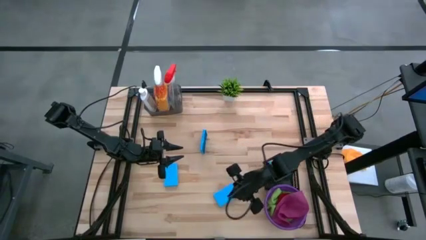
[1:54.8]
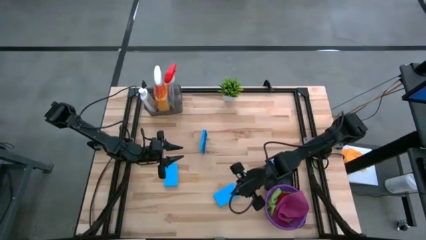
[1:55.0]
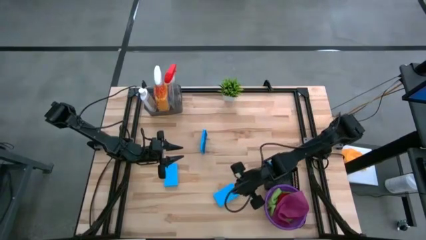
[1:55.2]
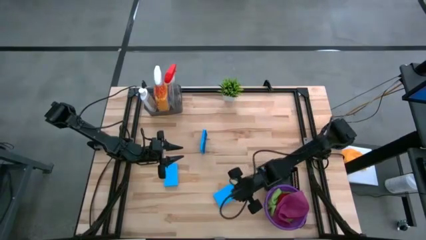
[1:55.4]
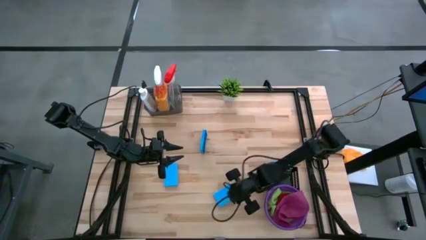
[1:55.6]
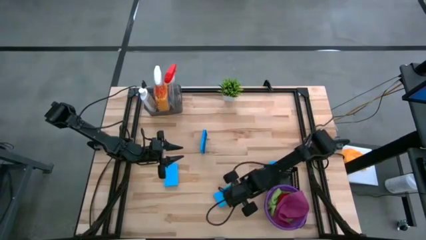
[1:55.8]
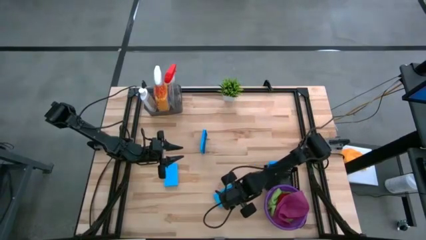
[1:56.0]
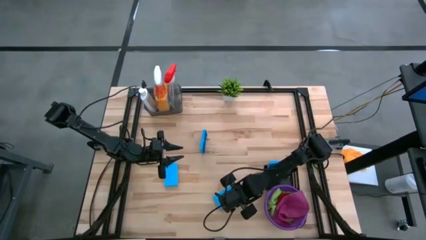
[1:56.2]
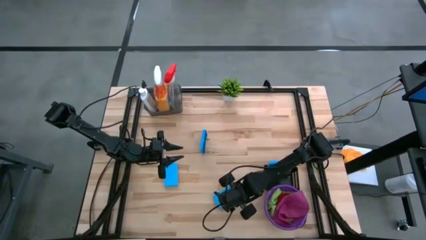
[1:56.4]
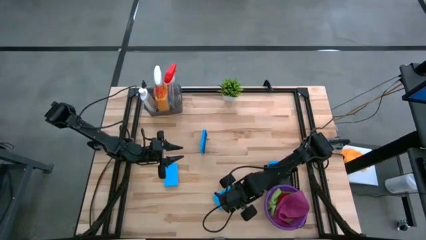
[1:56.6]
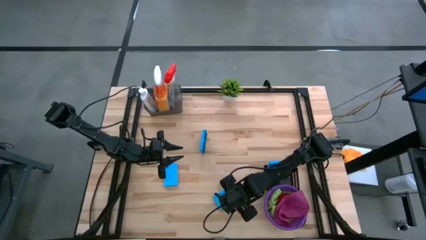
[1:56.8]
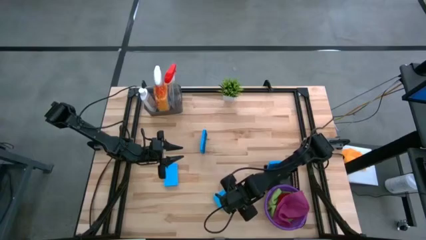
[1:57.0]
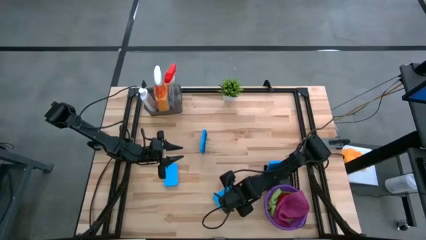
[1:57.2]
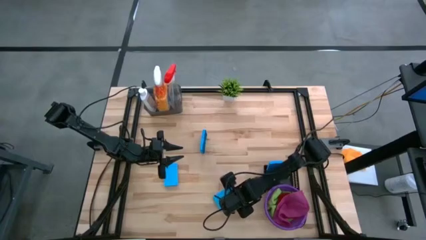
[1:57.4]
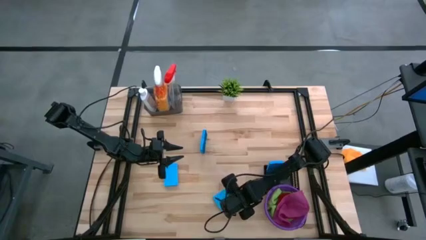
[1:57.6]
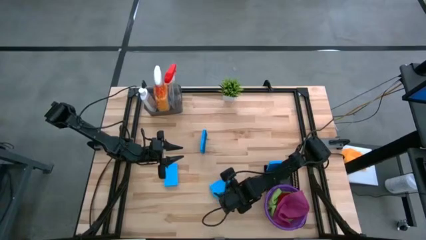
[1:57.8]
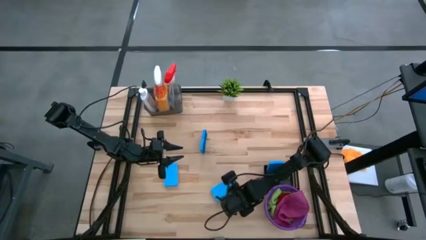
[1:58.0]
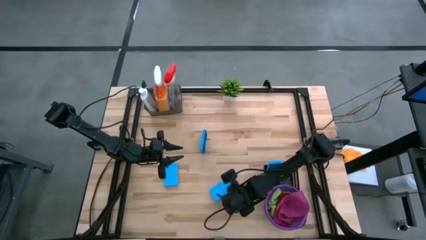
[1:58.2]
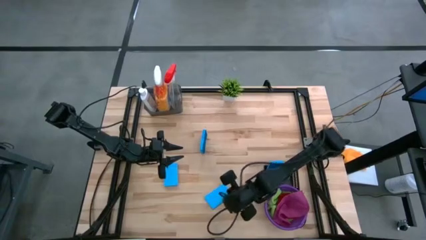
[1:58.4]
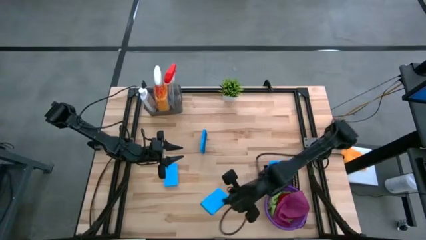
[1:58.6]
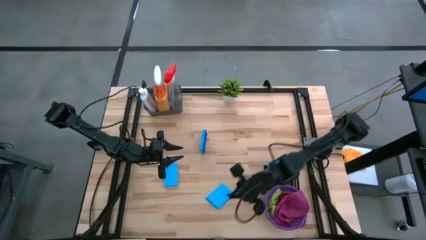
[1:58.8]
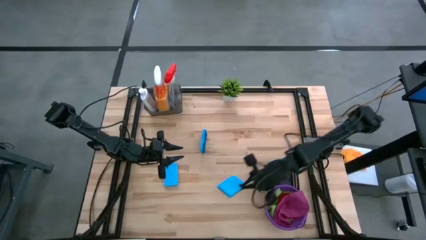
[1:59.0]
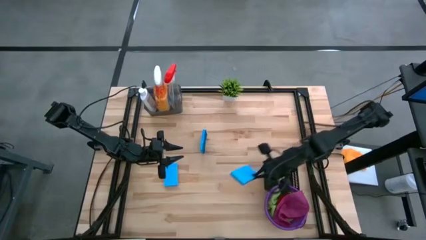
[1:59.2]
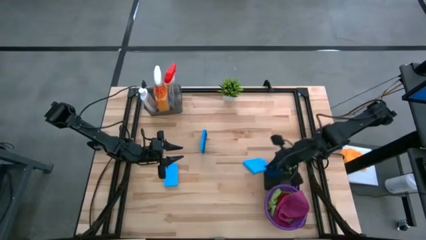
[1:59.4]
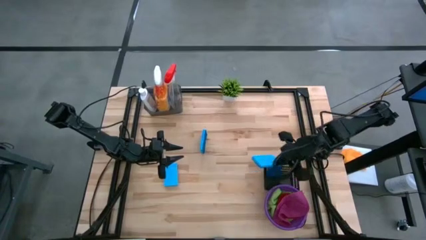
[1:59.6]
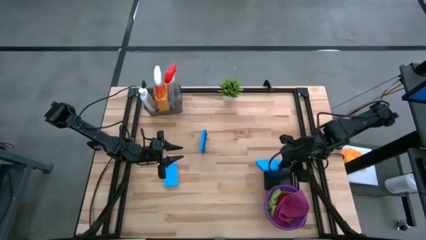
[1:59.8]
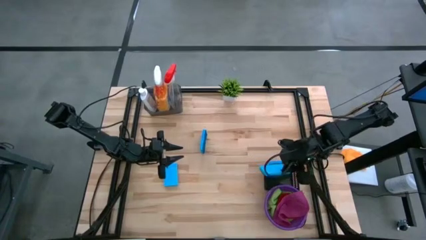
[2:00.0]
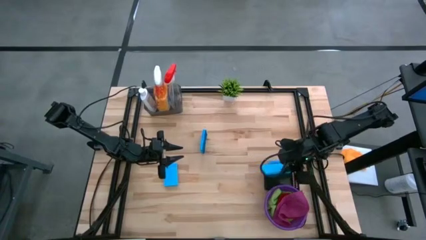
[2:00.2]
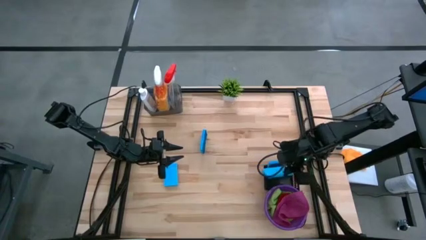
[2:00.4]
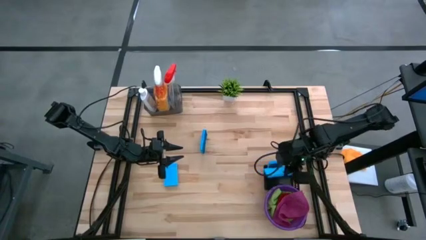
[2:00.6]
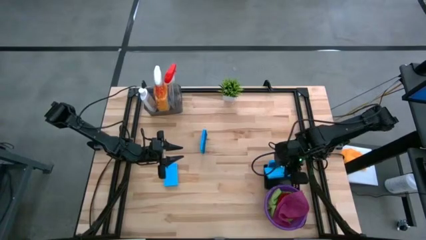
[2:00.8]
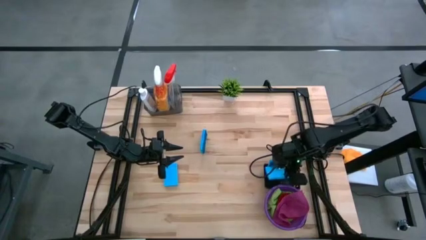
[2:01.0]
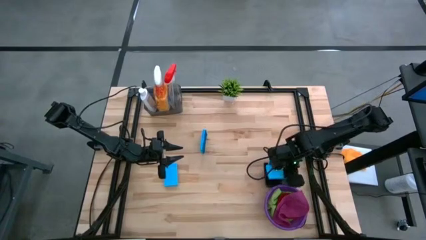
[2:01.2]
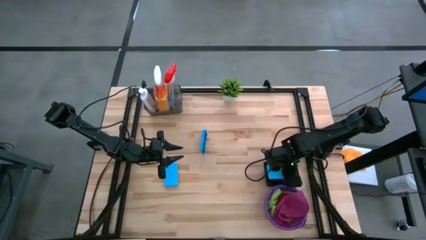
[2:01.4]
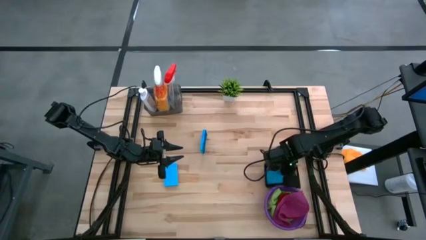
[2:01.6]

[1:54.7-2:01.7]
Task: Pick & Place Kitchen Items
Put the blue sponge into the black bin

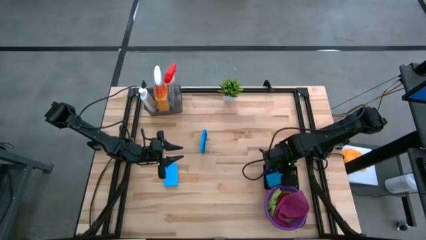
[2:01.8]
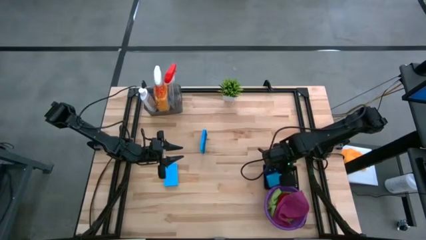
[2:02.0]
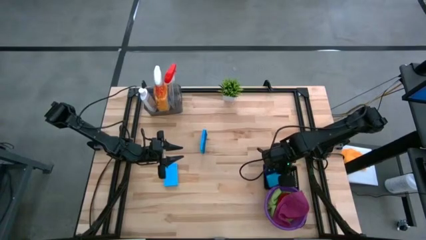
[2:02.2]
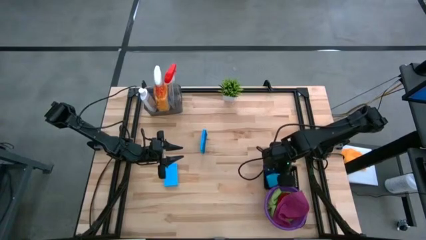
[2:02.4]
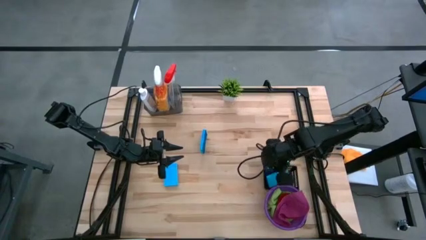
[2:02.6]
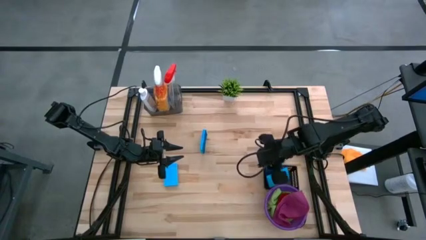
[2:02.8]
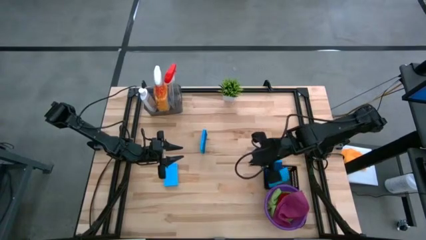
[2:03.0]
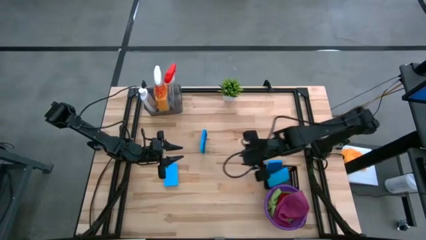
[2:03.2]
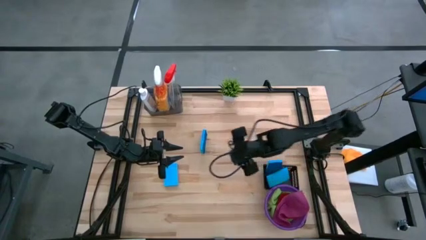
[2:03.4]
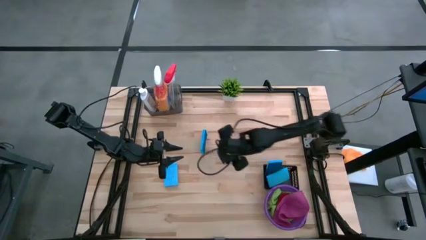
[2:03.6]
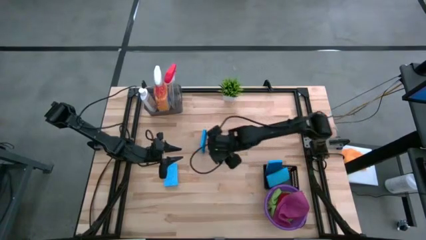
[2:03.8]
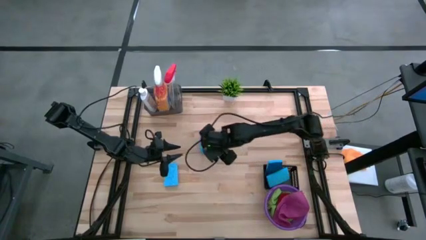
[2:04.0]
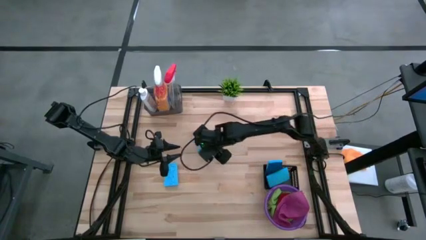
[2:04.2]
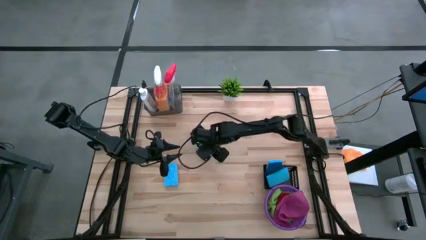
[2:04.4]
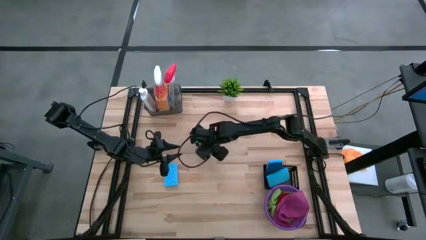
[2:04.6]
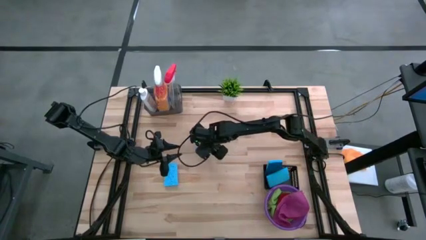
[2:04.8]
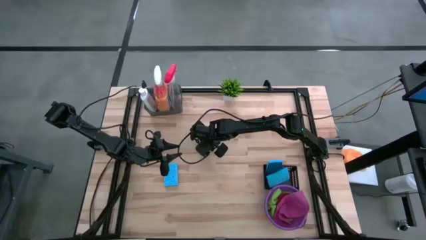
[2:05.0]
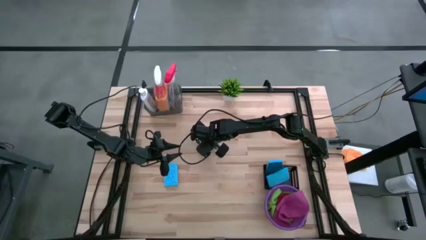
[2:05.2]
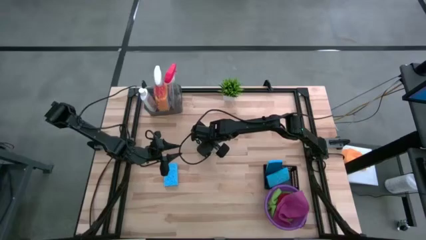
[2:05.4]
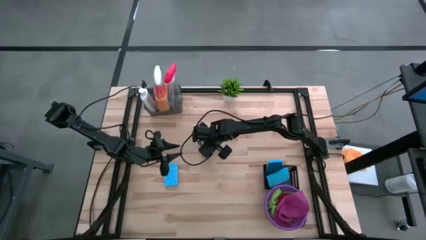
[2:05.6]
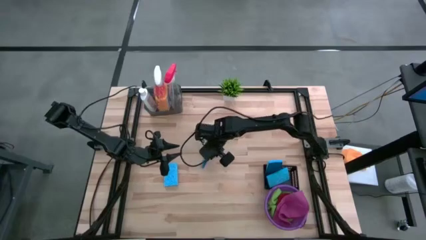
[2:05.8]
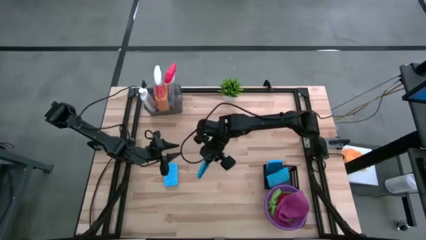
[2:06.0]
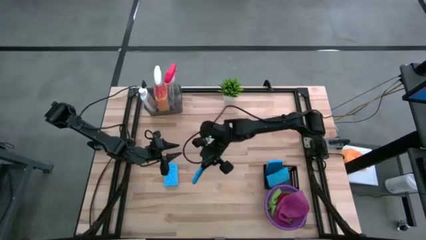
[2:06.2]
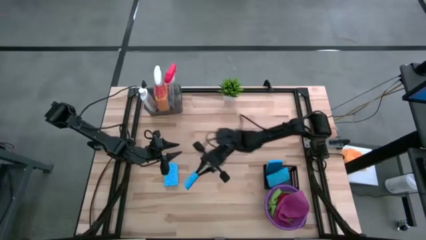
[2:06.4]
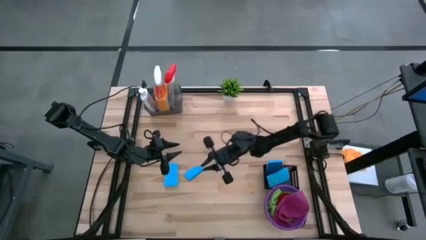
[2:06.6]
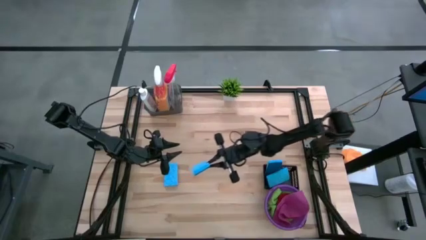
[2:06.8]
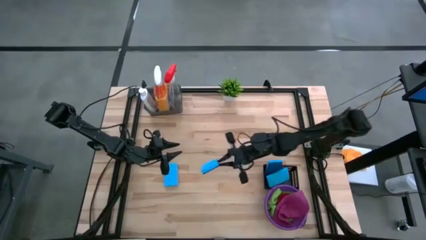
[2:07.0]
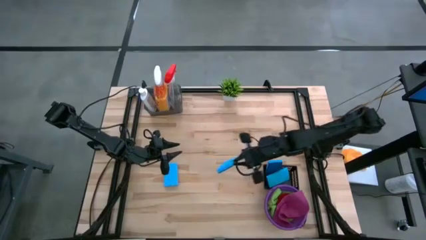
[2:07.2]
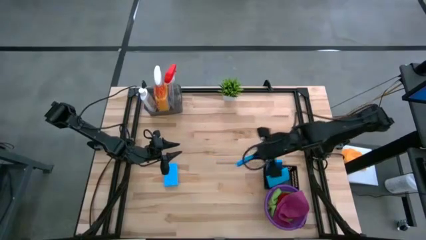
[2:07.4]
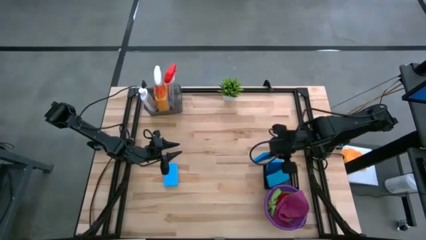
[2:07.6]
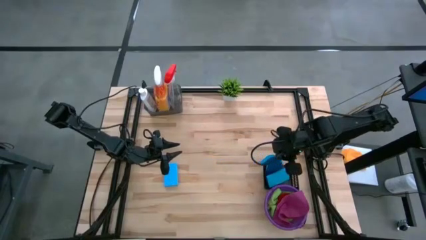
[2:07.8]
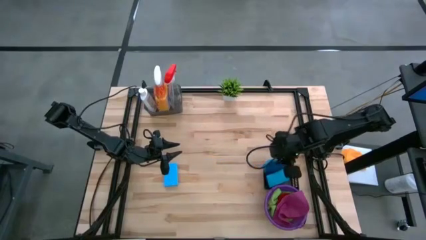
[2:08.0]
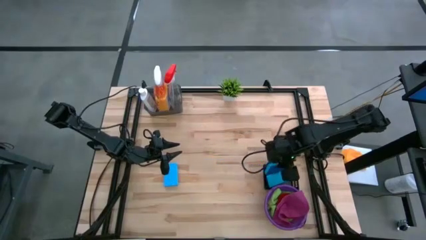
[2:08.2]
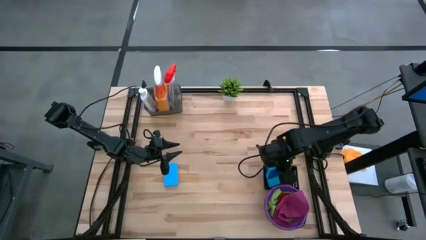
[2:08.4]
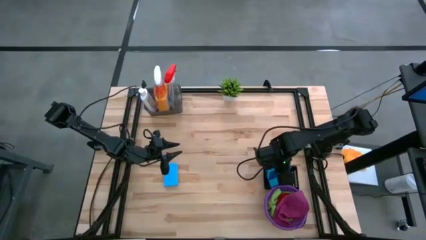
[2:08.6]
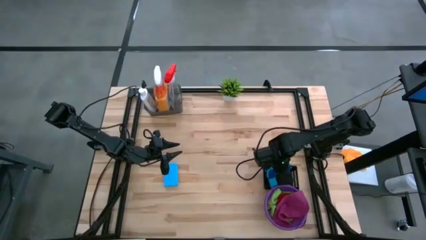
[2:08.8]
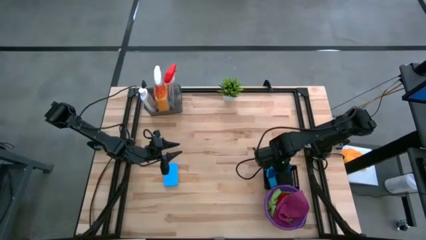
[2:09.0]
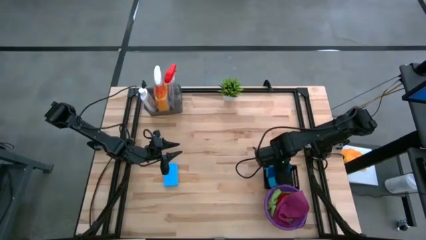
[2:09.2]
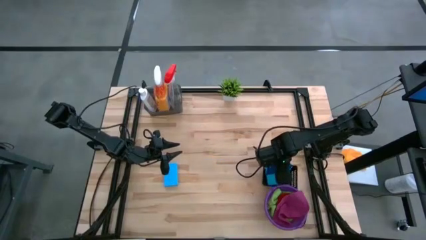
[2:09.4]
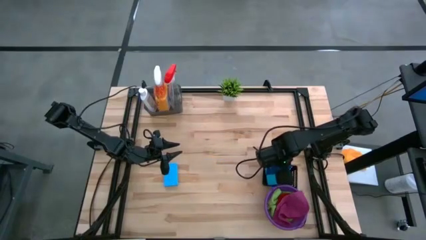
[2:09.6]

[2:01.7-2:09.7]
Put the blue sponge into the black bin

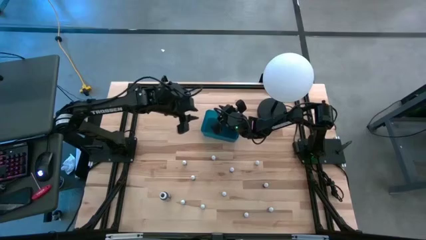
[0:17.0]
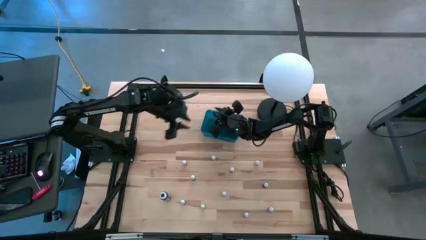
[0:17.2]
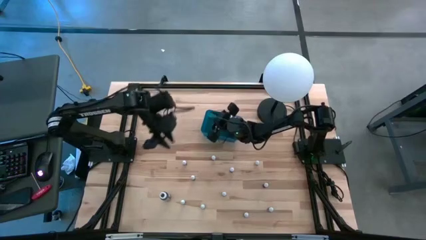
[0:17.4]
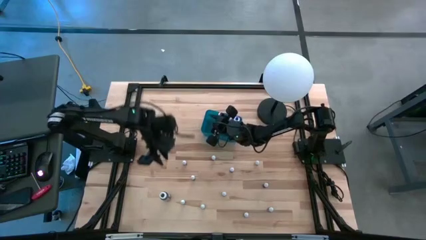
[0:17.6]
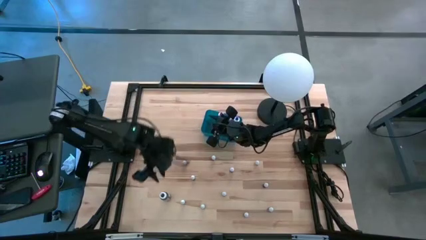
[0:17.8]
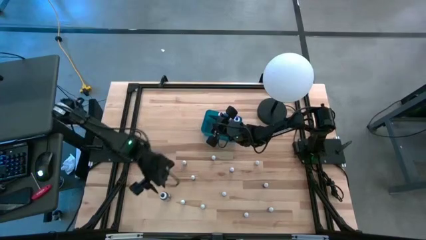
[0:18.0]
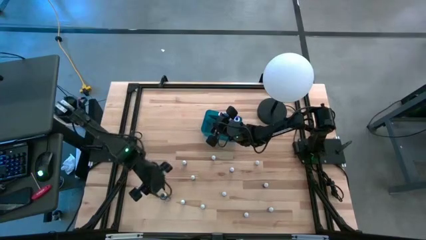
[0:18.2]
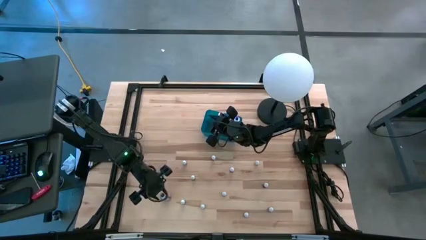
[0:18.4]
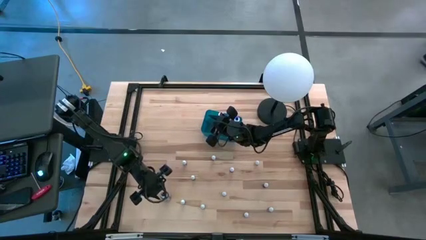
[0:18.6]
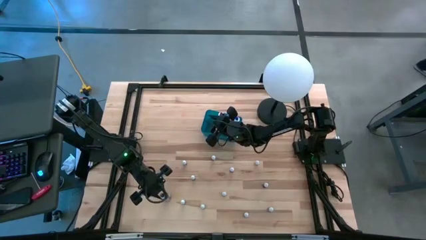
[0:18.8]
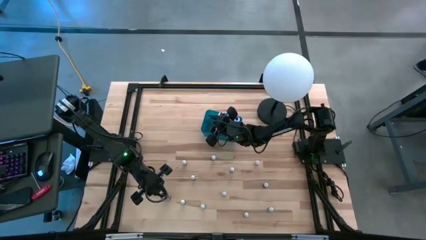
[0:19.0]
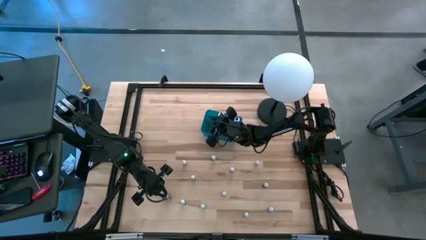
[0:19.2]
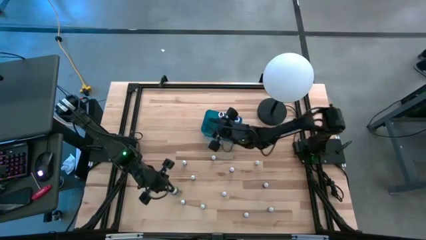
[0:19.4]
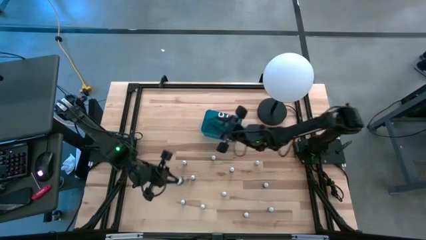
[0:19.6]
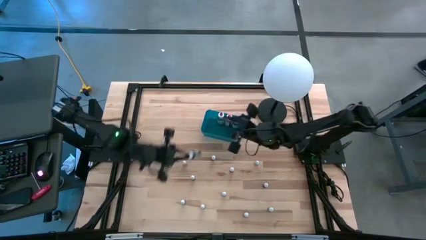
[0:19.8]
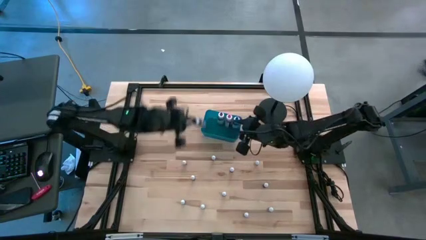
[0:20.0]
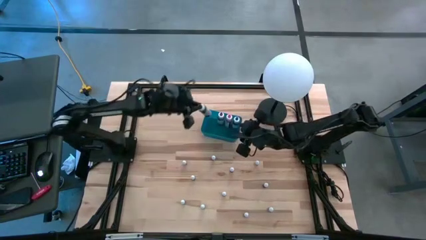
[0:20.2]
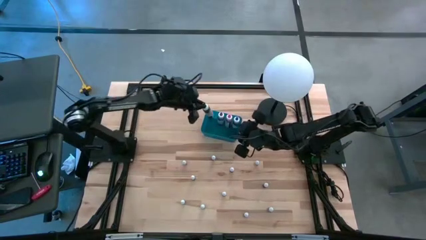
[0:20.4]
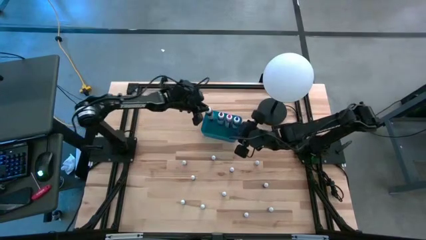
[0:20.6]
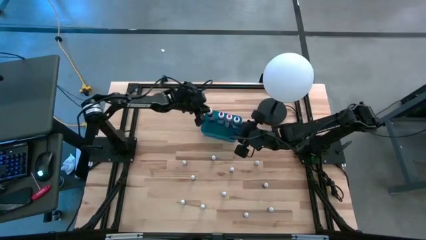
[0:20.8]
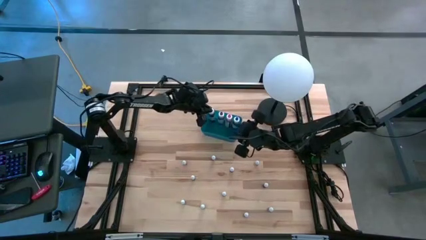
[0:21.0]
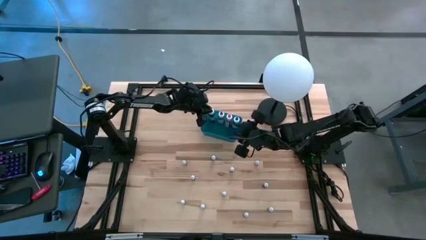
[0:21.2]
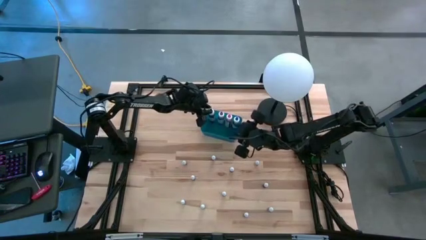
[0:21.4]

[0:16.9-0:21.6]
Task: Pick & Place food coloring
Put the large black food coloring bottle into the blue bin
